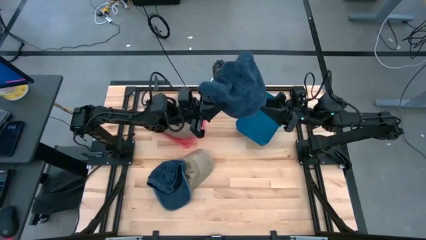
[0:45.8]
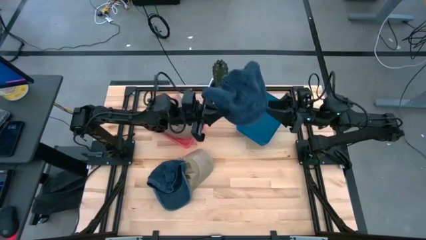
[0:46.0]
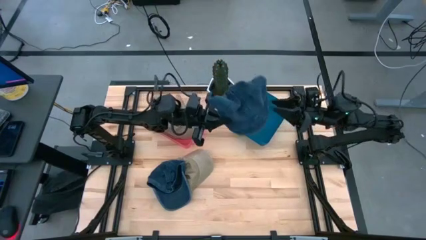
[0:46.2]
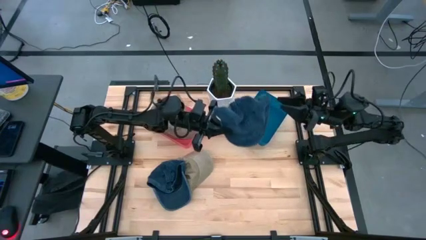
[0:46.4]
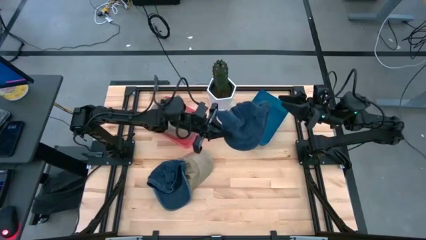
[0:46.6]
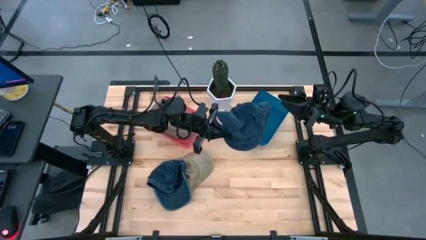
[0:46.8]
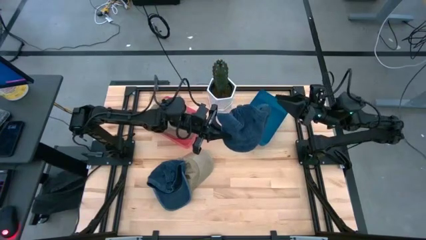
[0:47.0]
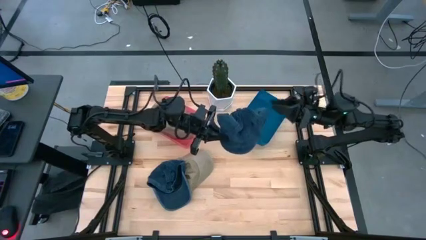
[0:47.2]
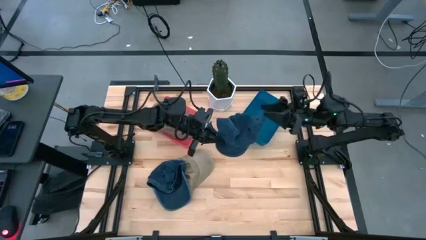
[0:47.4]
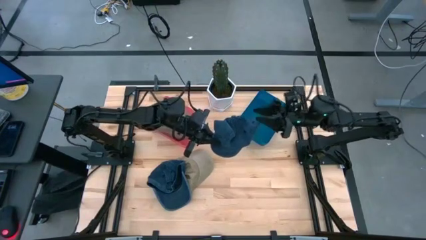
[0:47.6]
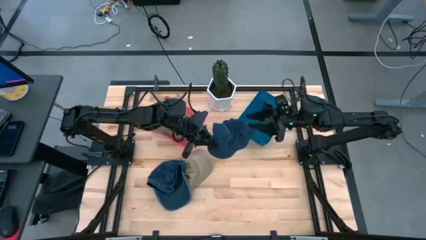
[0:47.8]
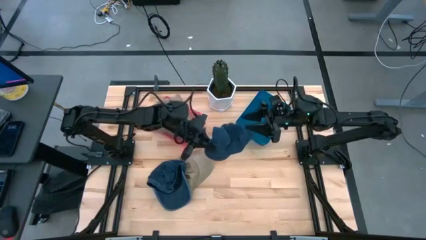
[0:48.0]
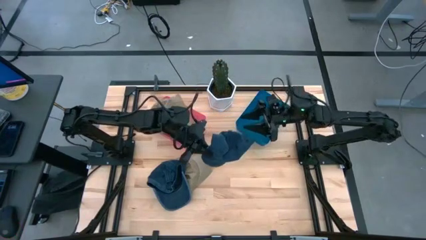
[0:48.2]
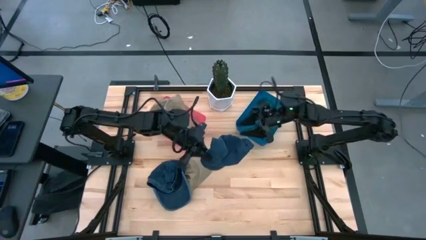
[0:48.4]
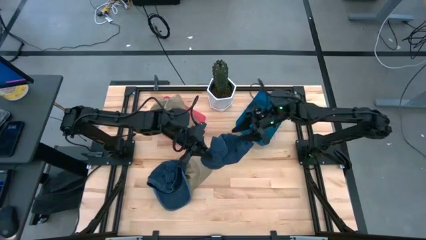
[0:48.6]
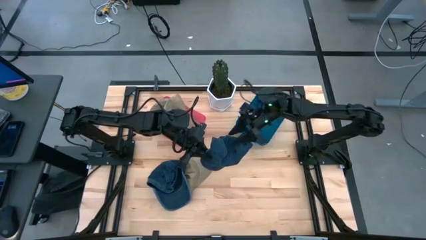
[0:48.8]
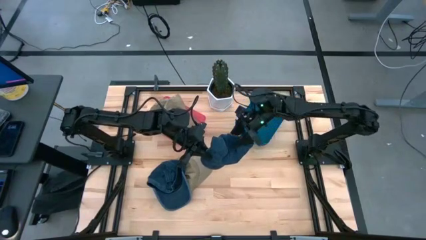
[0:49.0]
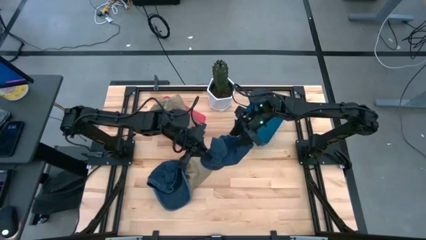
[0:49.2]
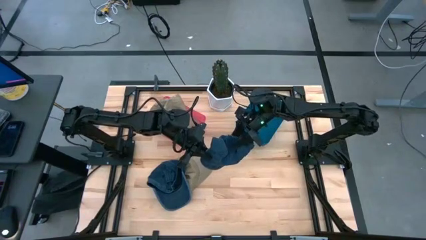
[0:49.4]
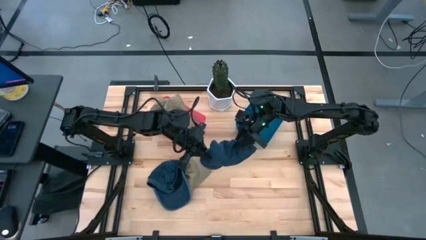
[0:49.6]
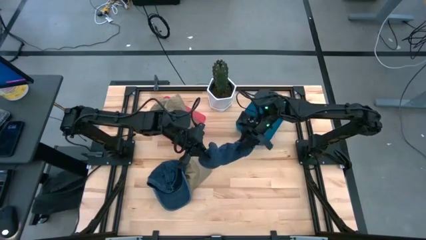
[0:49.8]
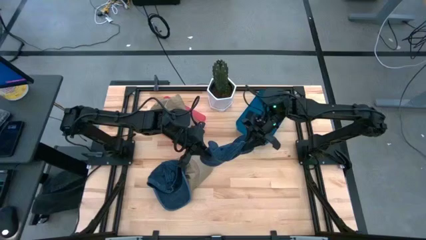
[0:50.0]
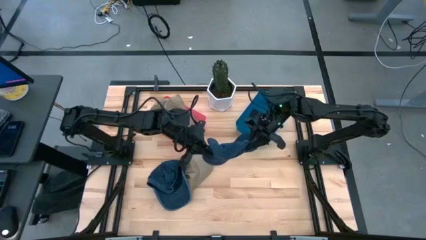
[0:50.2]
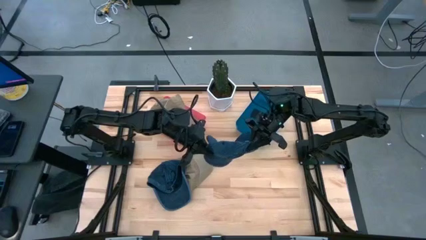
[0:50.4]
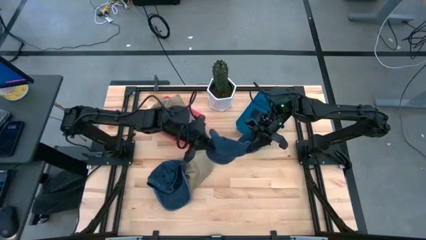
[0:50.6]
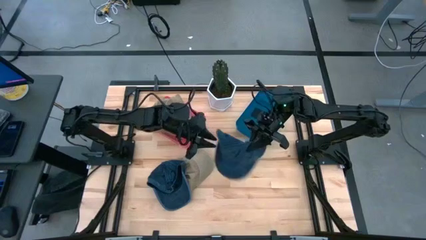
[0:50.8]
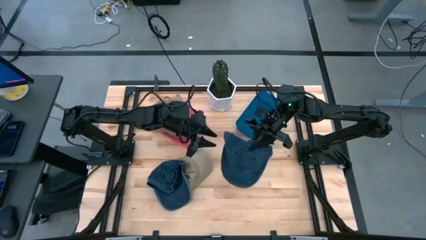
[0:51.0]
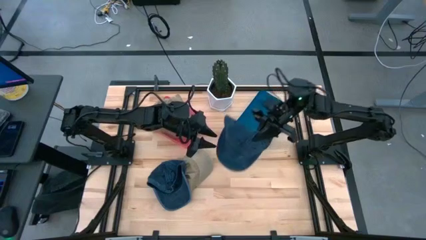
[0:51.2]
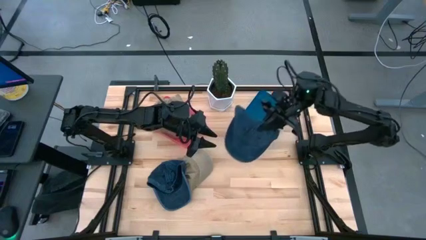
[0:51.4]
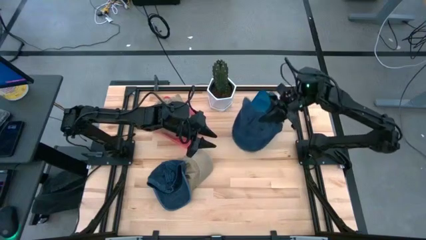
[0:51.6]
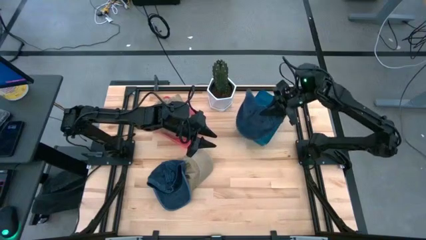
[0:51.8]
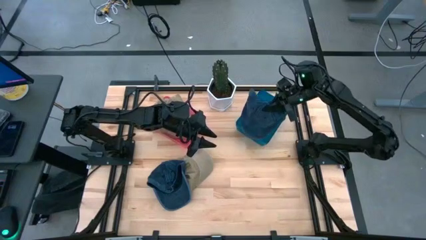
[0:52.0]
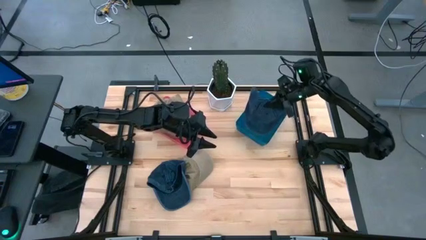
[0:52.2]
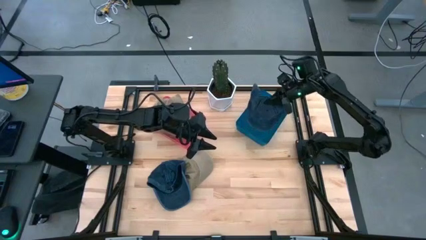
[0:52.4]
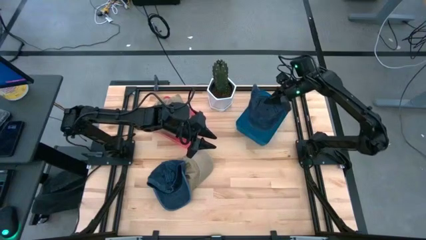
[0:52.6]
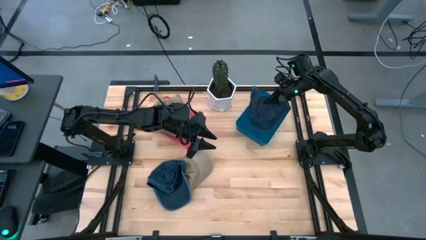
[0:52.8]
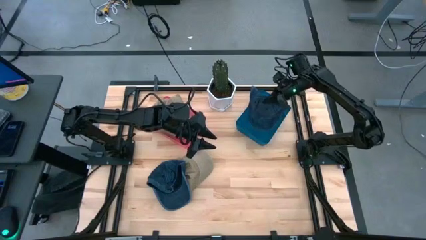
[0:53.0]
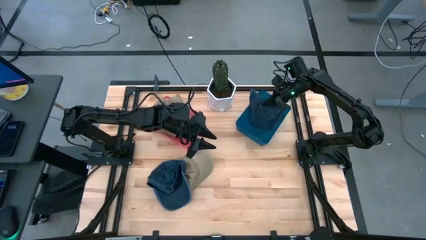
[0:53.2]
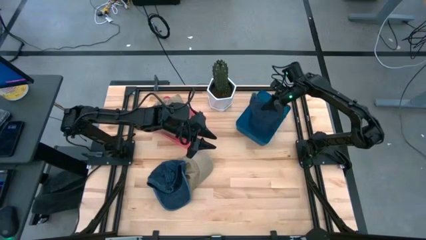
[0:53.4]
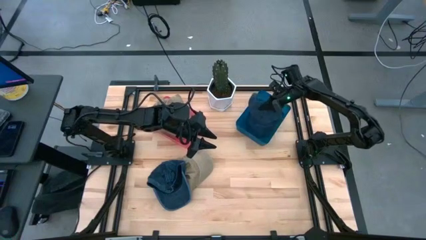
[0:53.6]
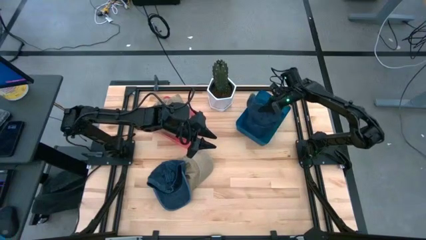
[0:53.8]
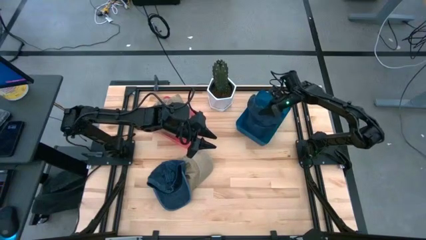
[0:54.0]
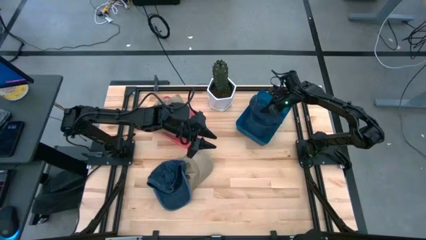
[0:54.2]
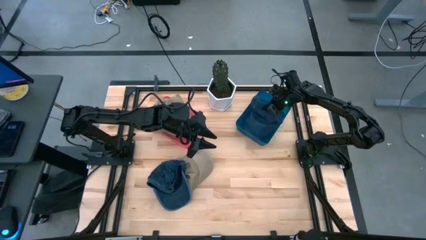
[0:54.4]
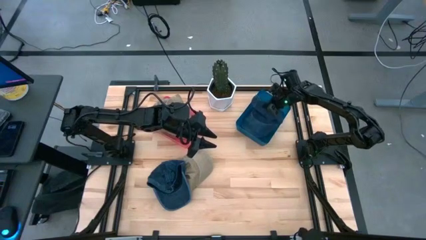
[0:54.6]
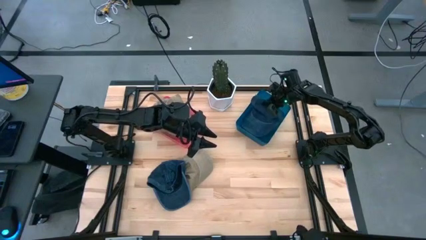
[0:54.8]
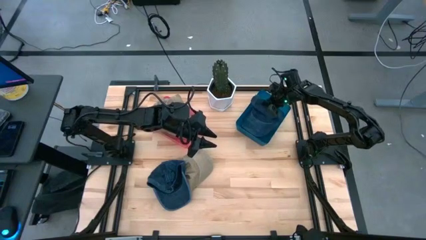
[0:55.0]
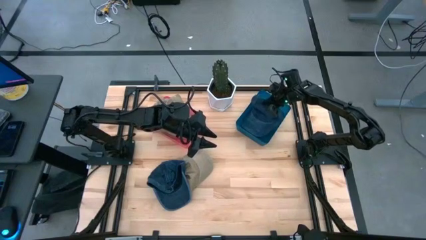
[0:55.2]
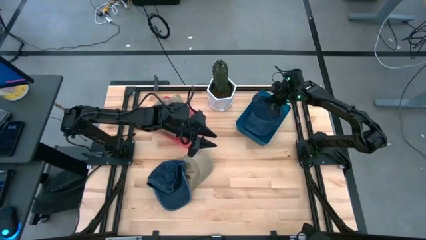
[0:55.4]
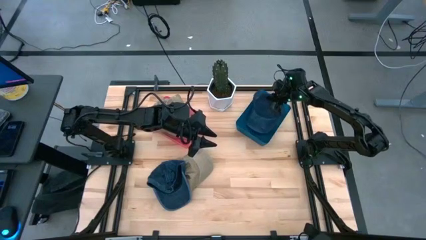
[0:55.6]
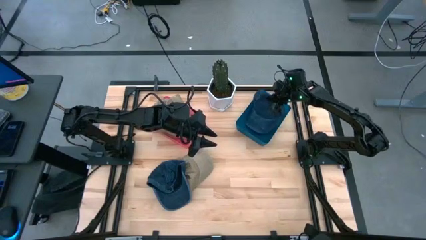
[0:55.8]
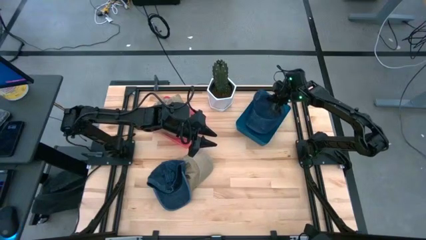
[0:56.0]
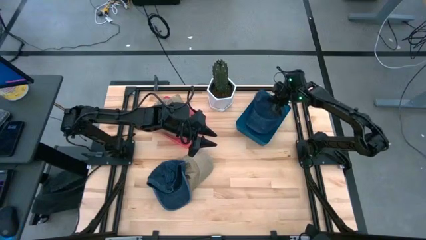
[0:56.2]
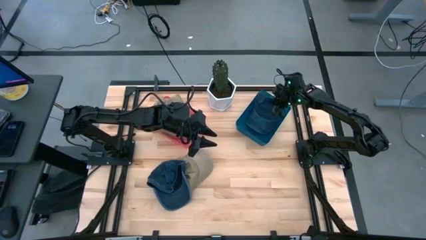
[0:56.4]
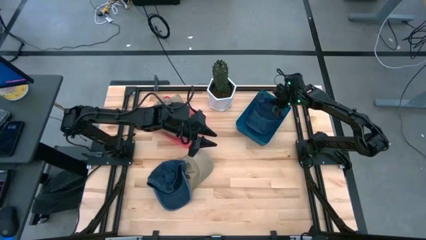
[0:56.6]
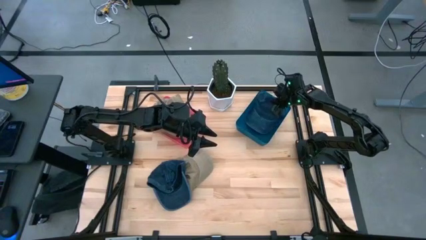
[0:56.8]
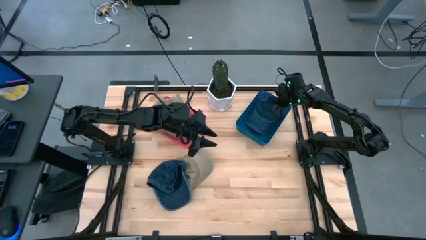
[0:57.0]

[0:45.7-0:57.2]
Task: Pick & Place hat
Put the right blue cap into the blue bin
